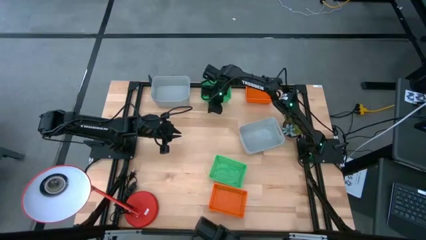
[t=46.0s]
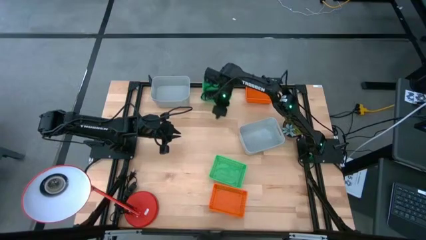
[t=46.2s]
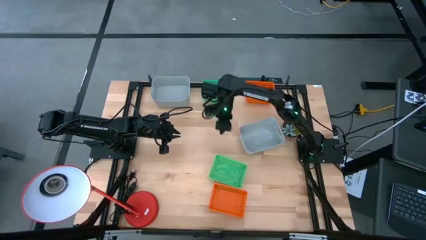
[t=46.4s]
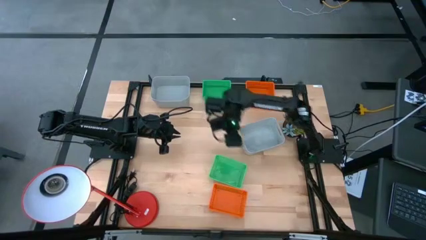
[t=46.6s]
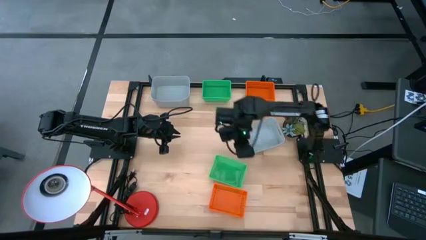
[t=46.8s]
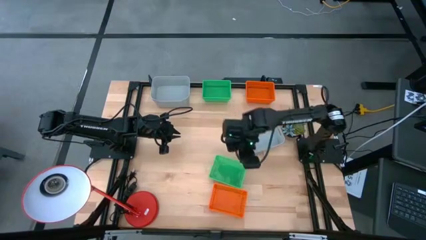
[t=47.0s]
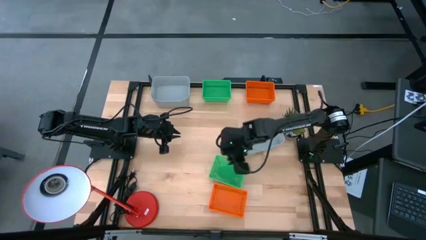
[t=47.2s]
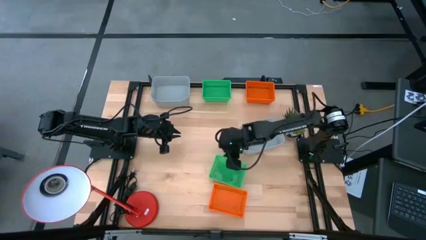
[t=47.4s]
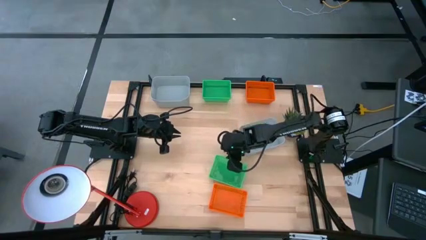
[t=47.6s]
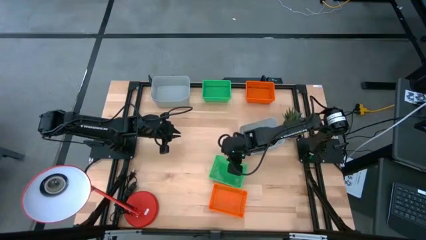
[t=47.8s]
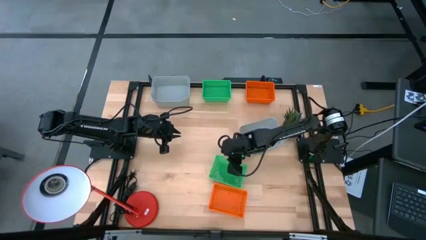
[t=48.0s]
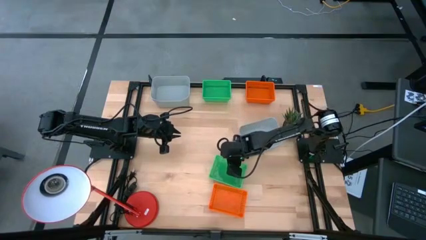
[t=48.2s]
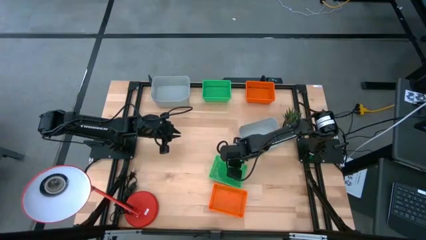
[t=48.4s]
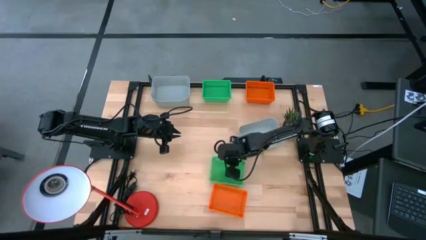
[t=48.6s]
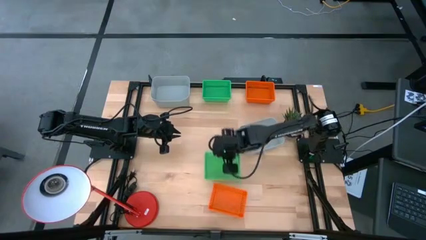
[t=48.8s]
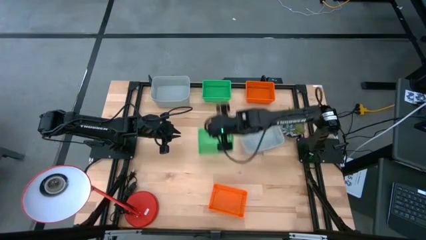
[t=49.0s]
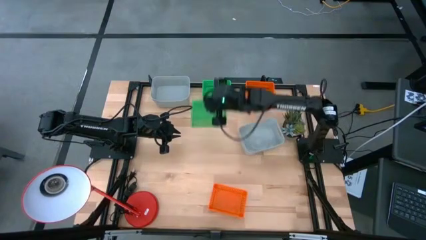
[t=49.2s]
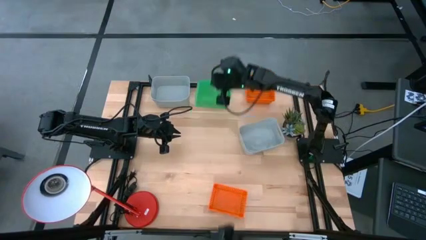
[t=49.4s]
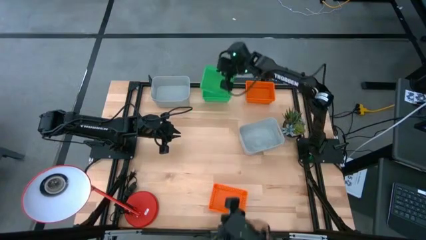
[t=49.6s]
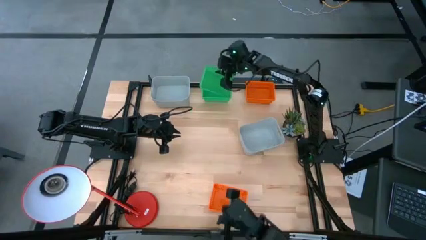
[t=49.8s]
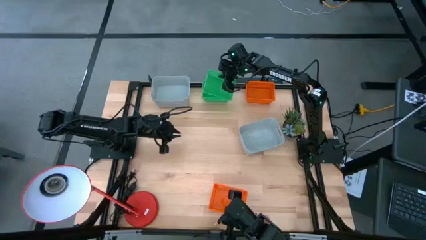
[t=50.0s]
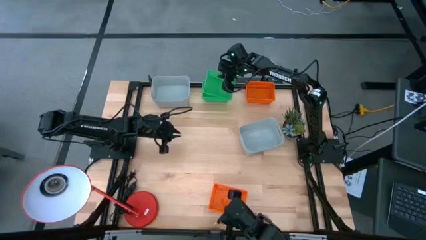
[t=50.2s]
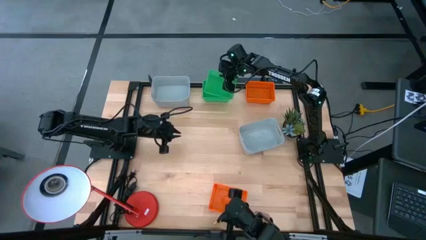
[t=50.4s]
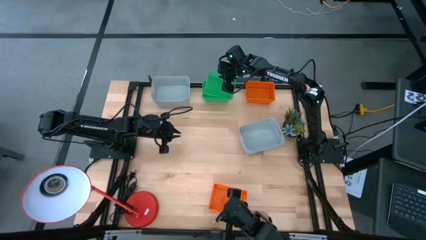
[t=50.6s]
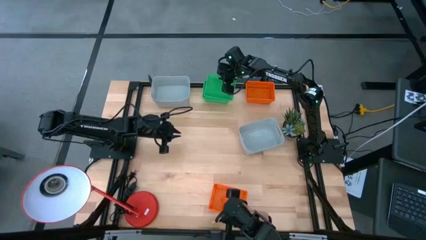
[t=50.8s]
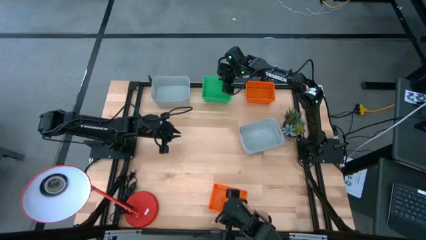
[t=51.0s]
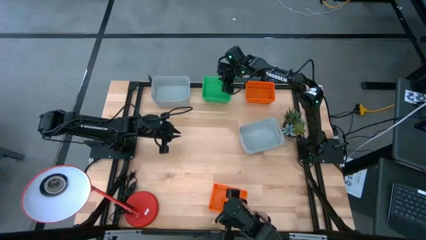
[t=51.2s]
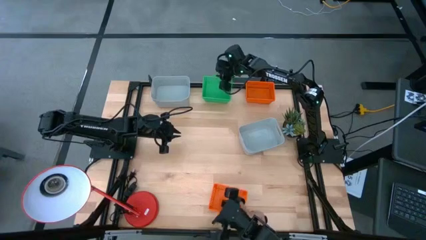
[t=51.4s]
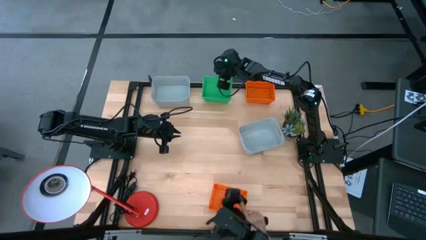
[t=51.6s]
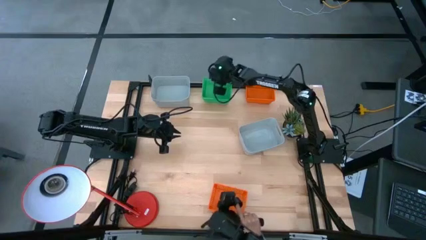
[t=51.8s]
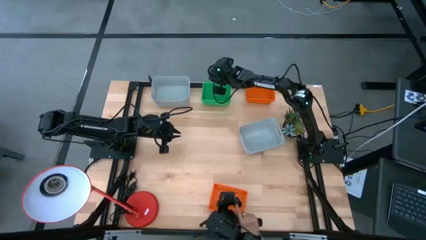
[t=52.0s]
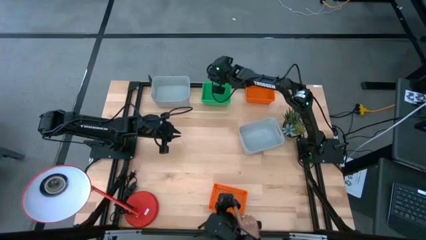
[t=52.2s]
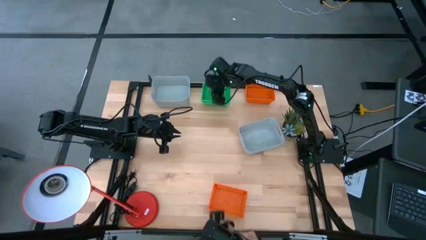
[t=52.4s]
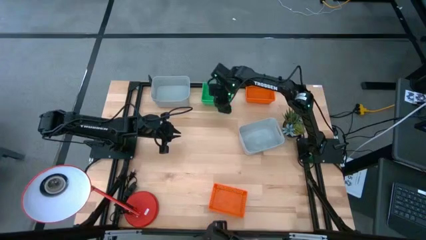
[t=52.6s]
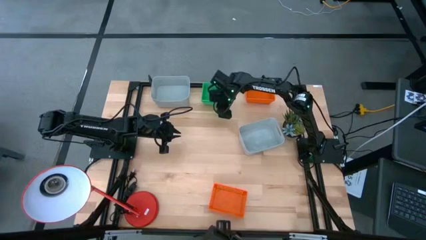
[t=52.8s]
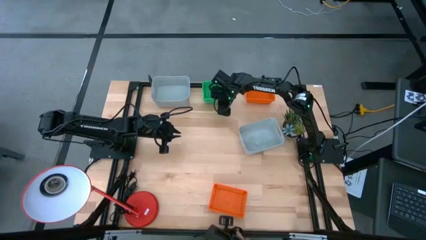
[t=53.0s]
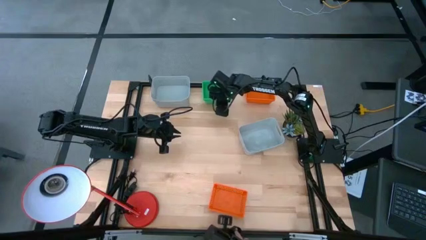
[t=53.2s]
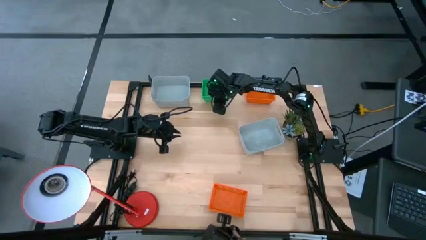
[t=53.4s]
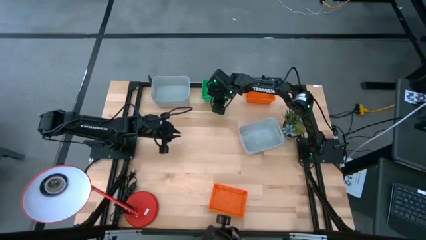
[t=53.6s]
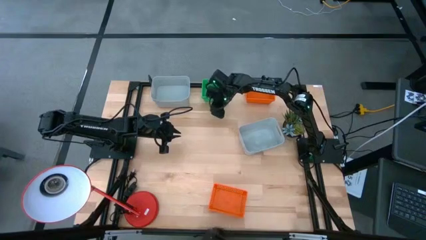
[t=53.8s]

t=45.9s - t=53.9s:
Stack the bottom green bin on top of the top green bins

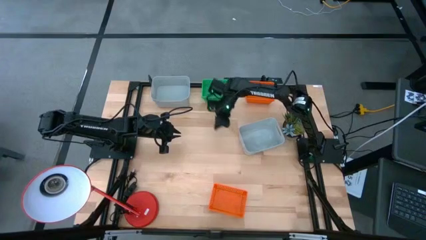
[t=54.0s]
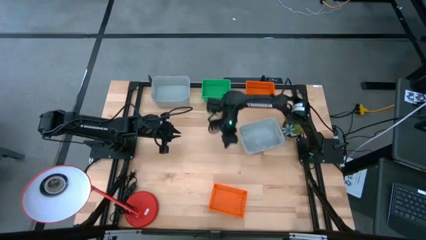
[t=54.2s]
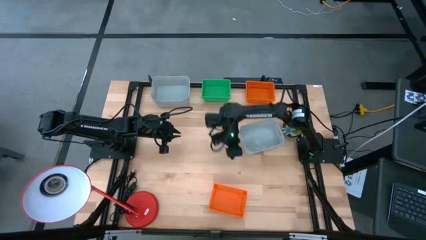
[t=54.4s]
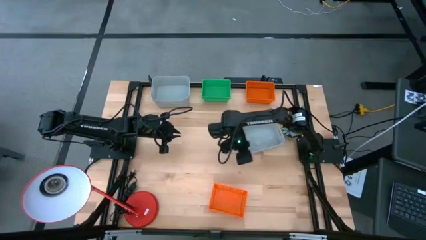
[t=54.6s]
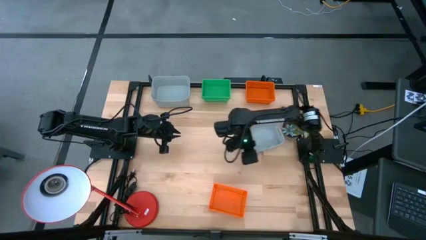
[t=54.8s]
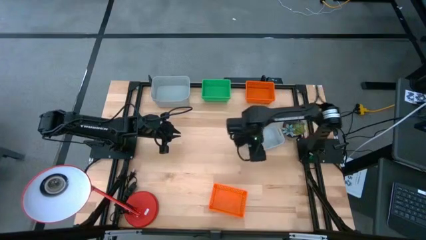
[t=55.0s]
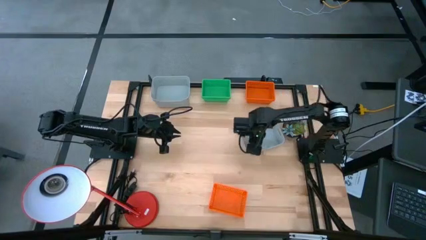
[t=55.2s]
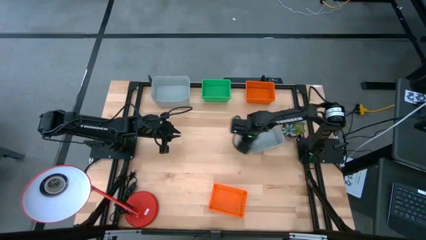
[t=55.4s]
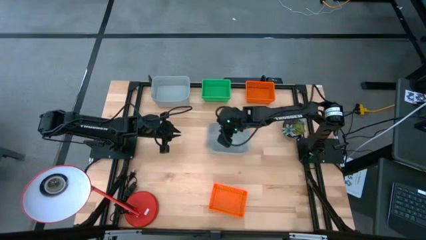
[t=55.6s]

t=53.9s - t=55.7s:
Adjust the bottom gray bin

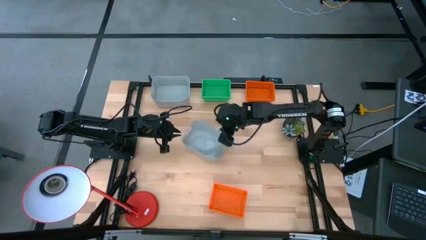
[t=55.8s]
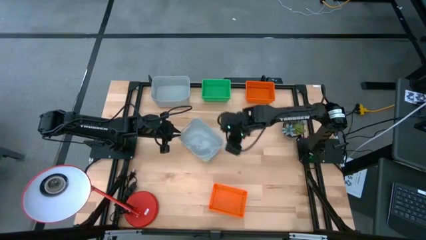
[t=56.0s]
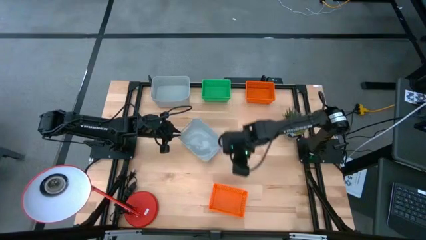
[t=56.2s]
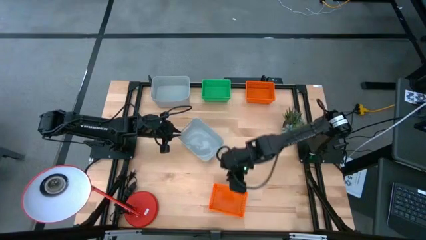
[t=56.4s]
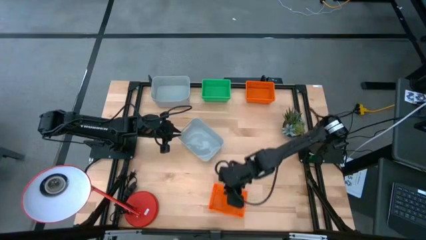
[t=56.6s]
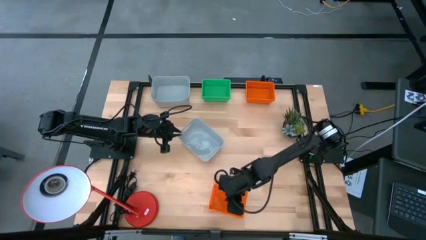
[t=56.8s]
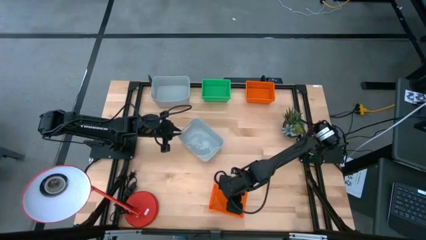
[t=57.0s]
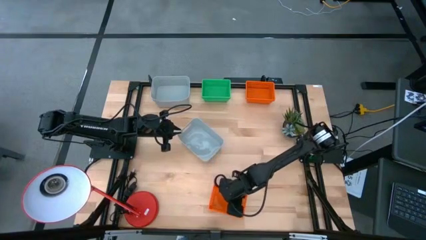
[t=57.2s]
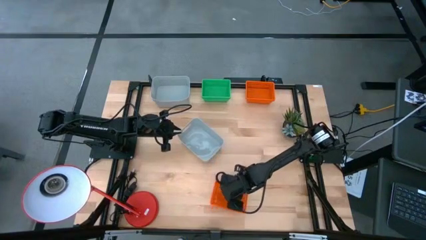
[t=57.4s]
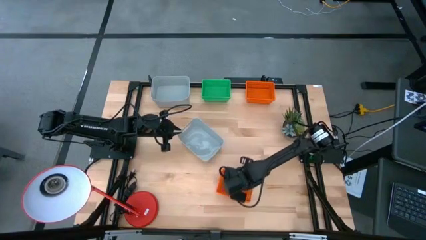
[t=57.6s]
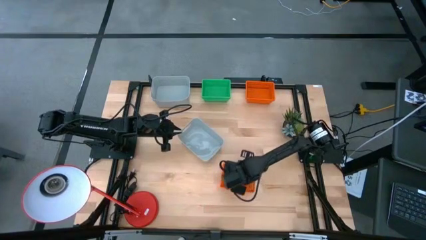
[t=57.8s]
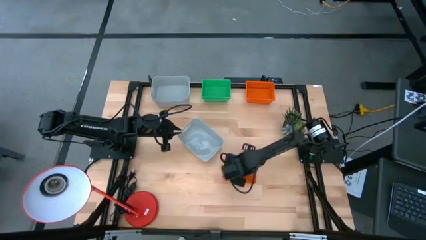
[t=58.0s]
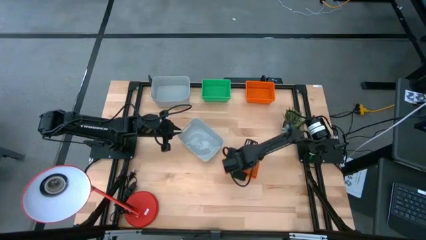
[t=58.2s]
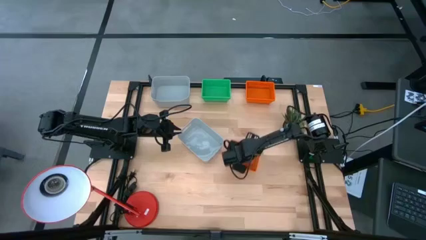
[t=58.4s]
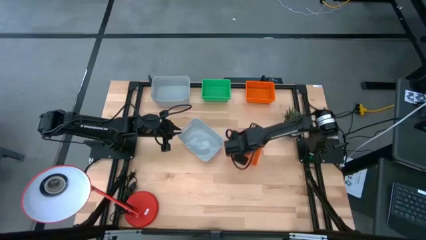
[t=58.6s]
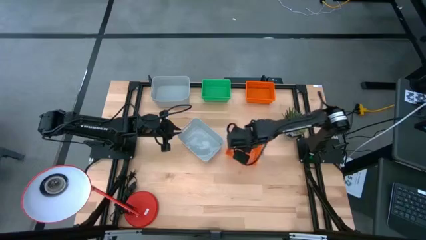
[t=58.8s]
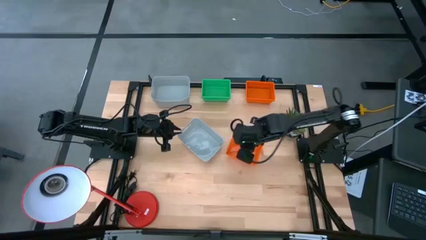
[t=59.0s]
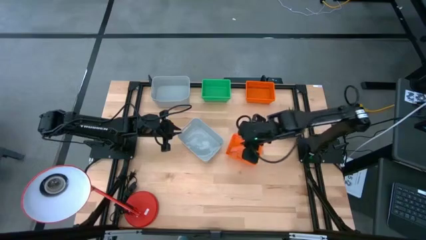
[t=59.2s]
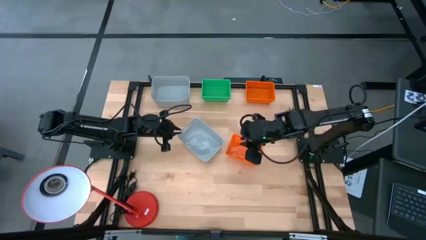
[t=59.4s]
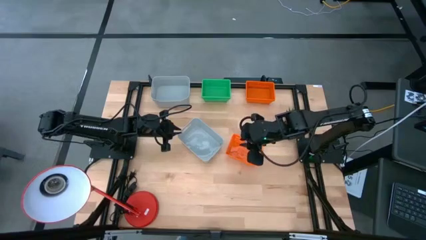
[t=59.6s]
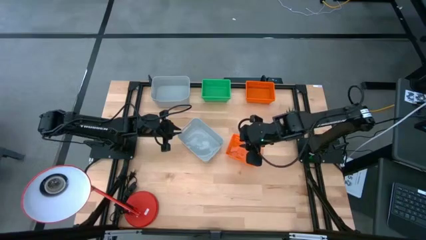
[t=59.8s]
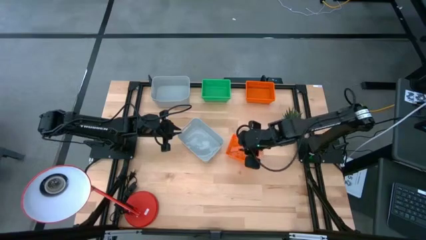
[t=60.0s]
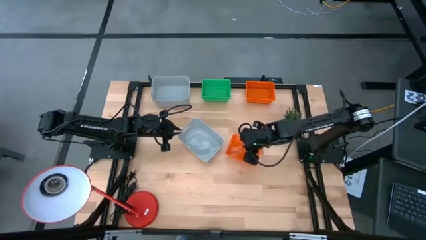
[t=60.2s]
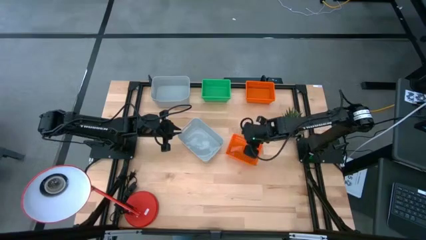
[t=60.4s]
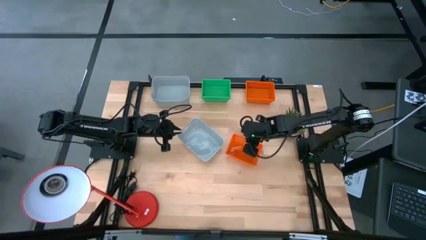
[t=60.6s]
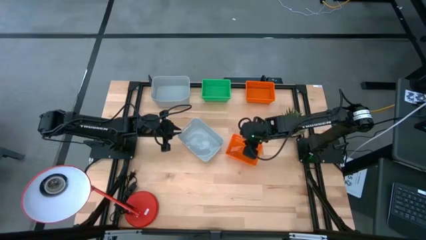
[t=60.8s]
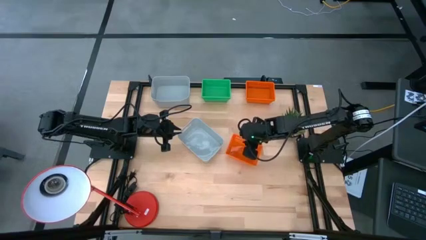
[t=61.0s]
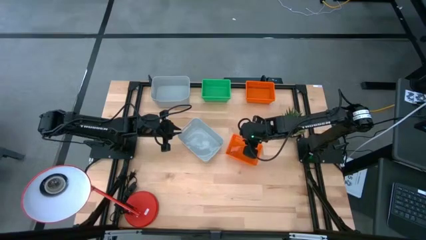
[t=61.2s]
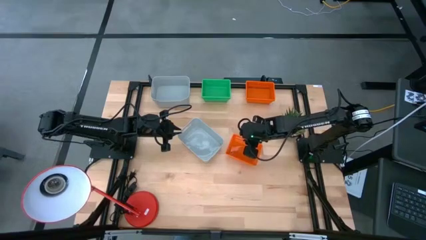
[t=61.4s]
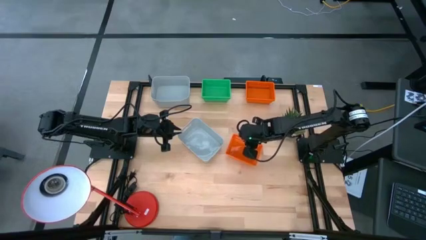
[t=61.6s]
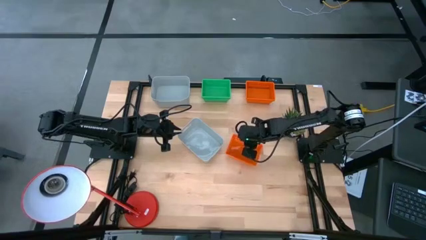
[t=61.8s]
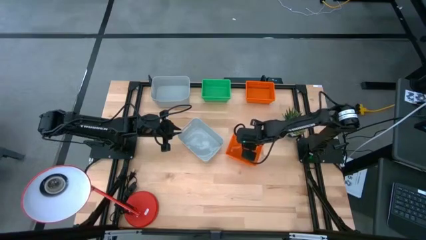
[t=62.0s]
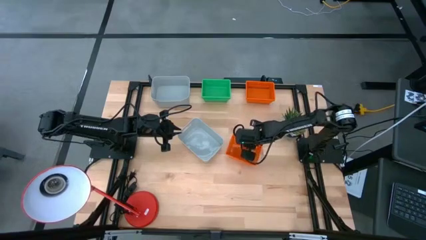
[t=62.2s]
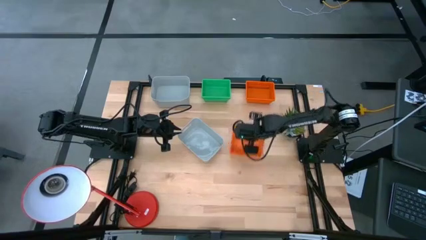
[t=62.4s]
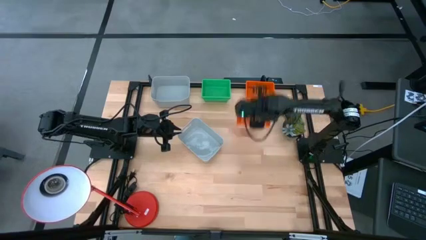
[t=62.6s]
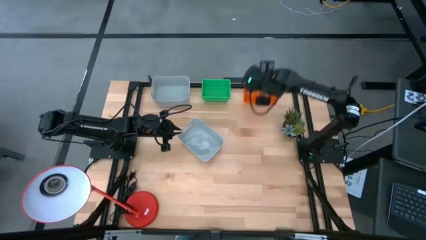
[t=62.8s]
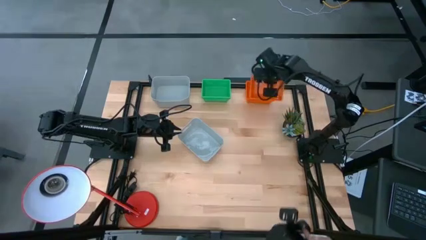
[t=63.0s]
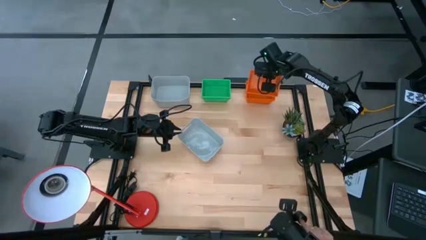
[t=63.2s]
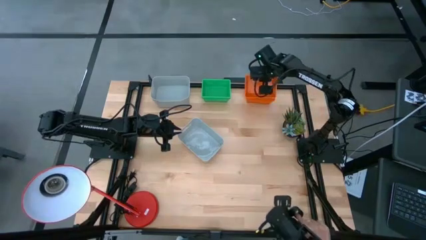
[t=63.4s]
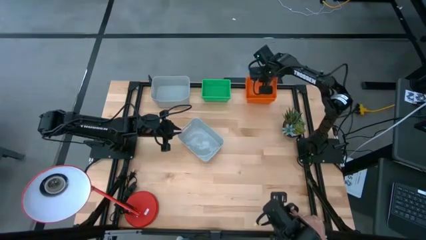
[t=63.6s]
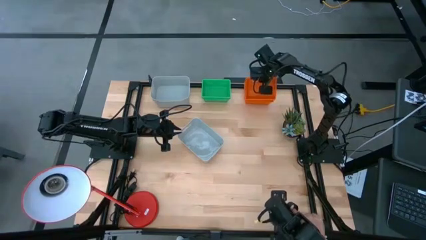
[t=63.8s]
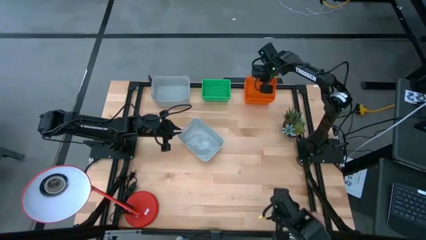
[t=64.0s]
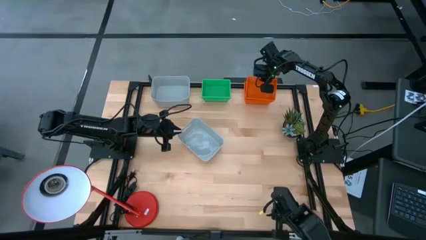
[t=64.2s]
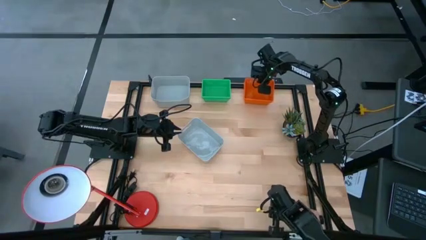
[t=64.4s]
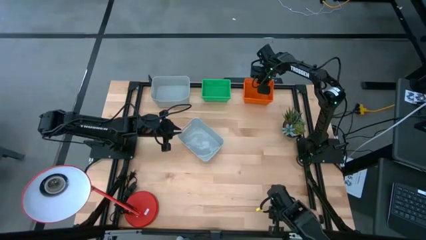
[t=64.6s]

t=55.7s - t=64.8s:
Stack the bottom orange bin on top of the top orange bins
